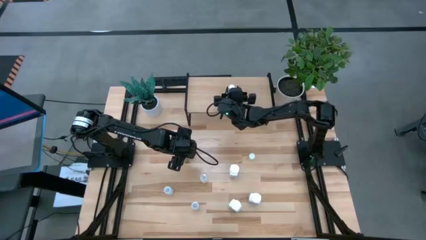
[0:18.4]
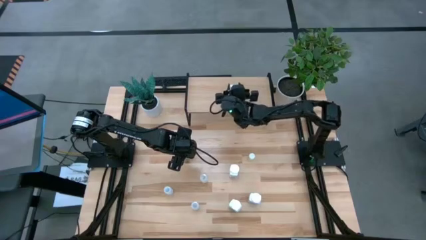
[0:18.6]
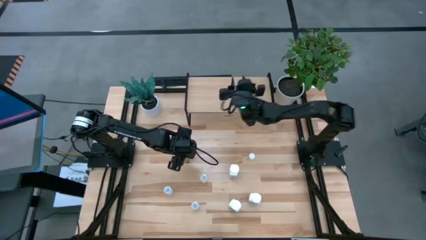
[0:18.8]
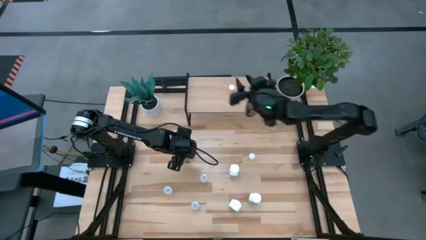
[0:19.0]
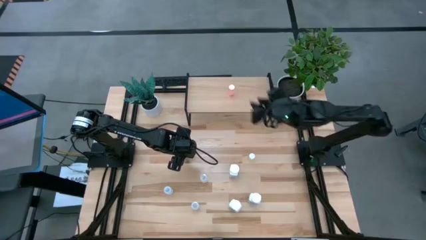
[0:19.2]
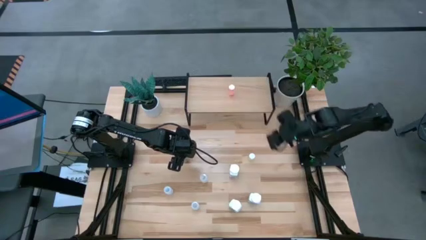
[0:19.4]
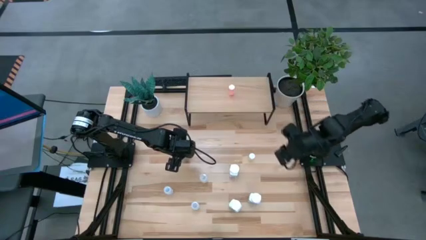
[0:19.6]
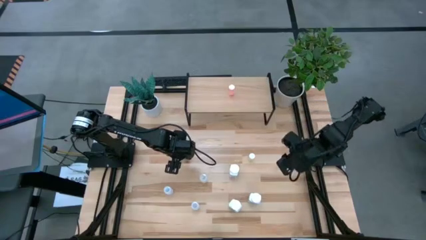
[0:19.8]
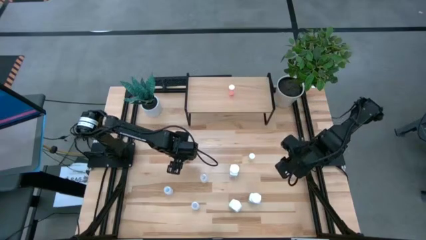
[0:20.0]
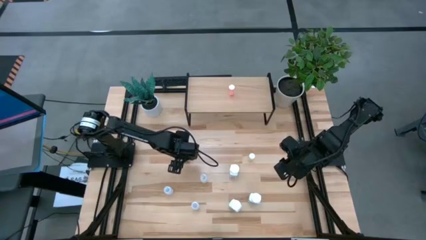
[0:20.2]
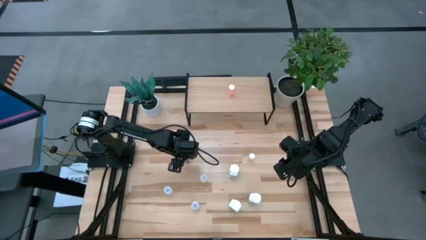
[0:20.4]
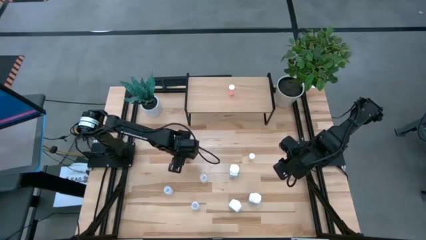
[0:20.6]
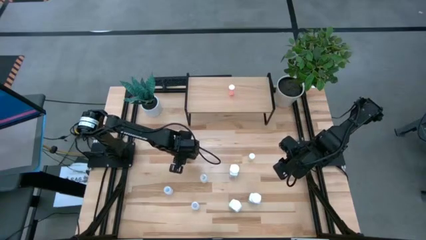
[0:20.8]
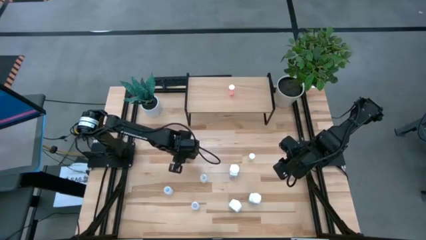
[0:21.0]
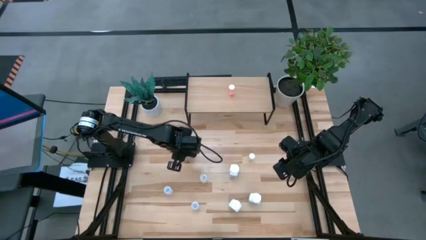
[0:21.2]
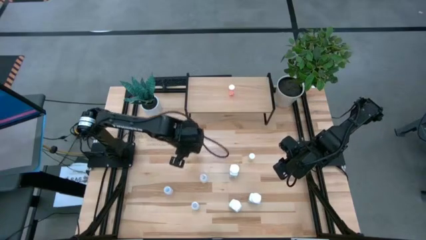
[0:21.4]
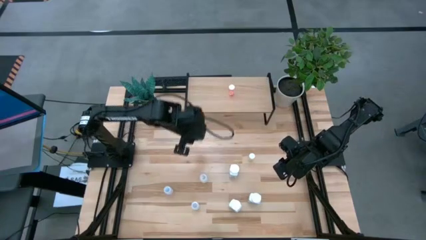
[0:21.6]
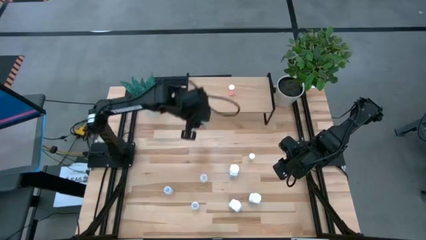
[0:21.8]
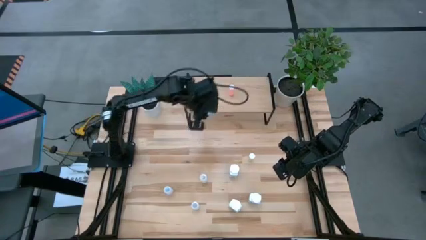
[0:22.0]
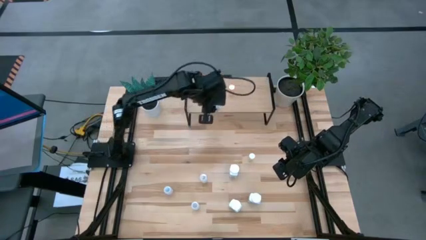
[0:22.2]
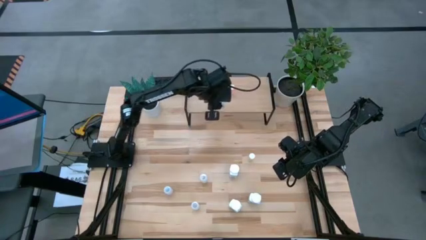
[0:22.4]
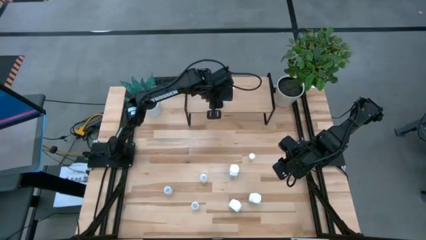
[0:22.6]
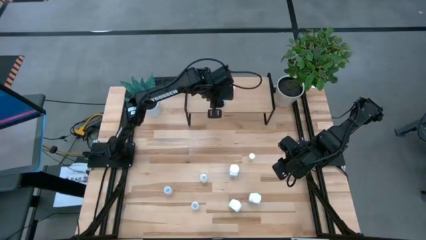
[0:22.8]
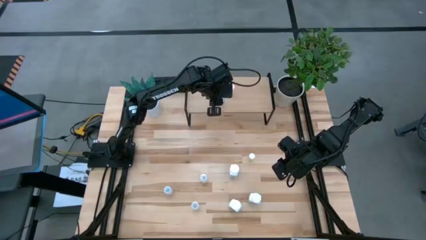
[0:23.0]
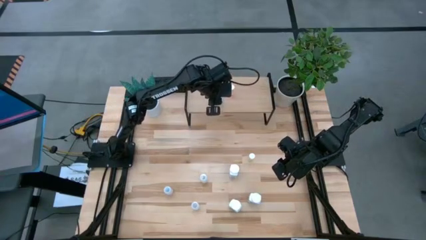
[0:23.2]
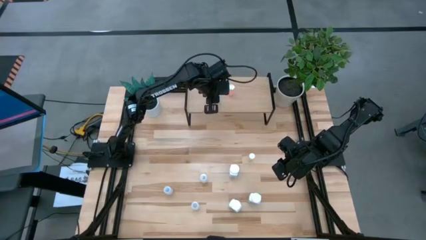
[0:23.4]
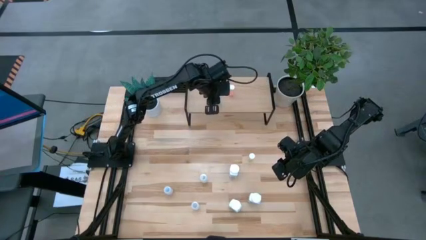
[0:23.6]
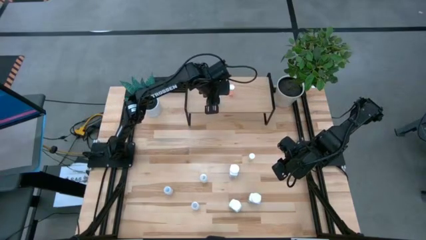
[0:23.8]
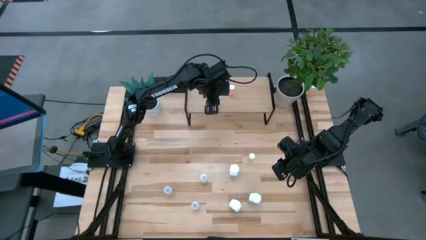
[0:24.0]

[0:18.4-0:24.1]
Task: Pick and place medicine bottles onto shelf by color
Put the blue pill bottle on the shelf

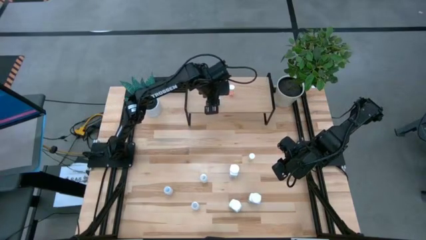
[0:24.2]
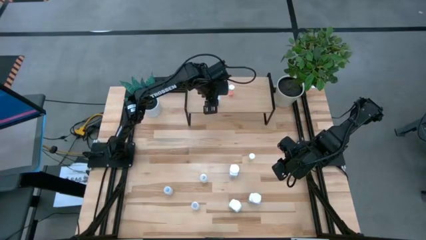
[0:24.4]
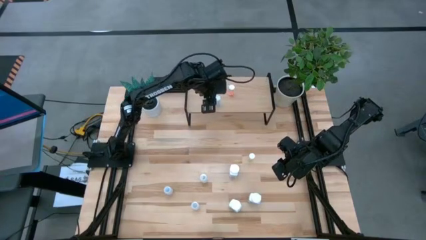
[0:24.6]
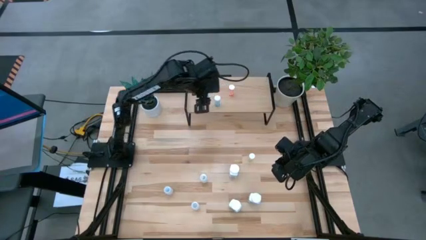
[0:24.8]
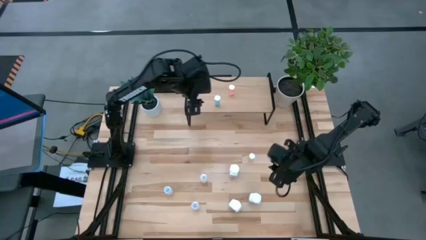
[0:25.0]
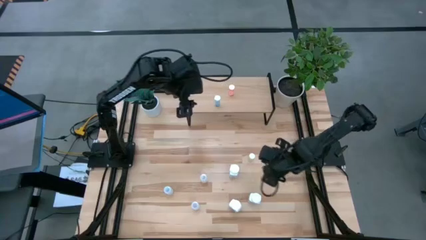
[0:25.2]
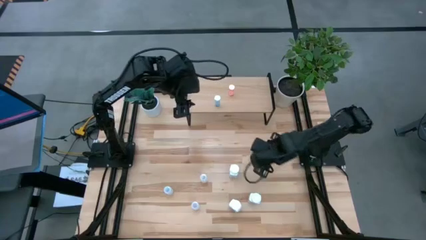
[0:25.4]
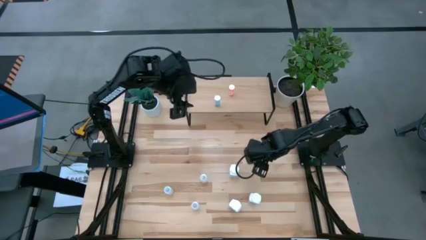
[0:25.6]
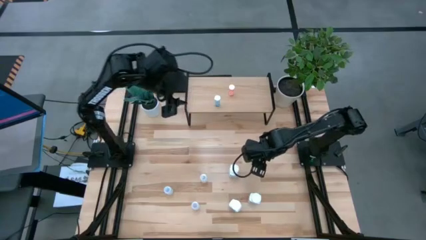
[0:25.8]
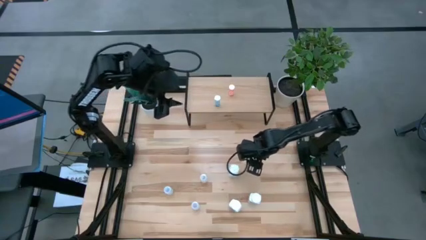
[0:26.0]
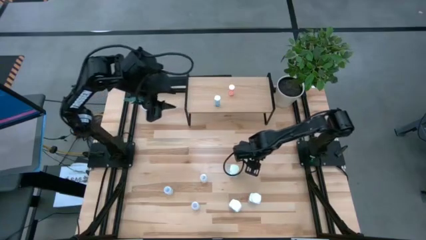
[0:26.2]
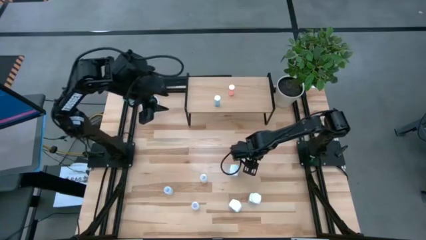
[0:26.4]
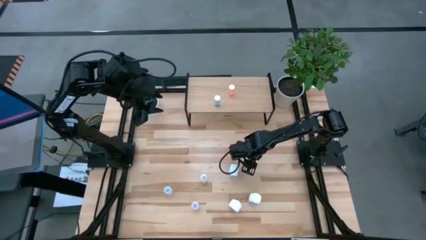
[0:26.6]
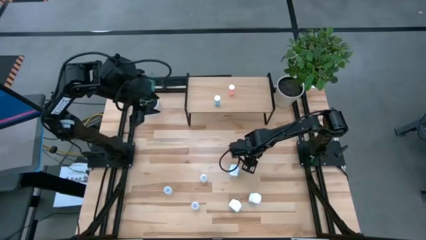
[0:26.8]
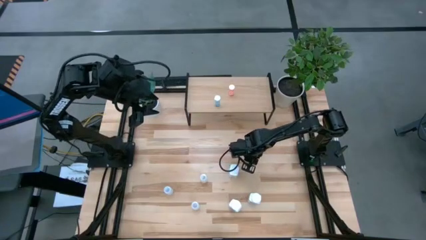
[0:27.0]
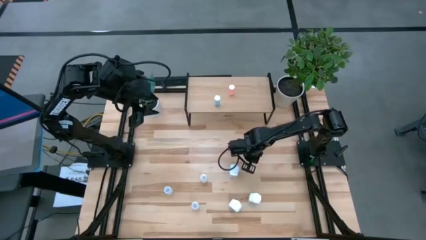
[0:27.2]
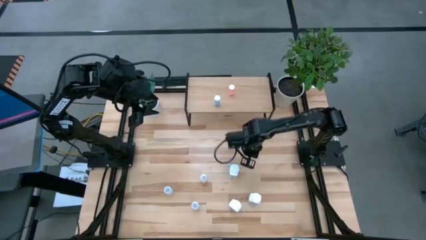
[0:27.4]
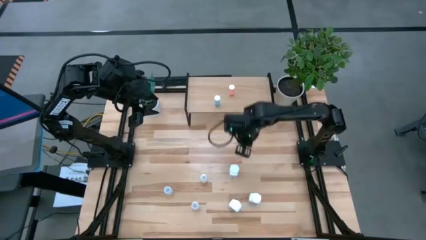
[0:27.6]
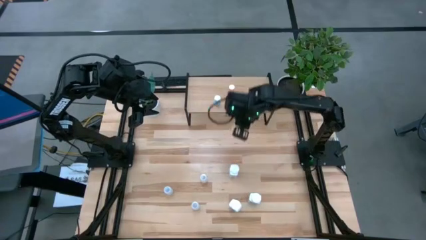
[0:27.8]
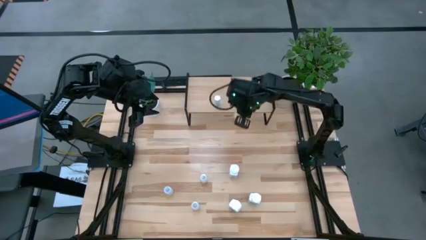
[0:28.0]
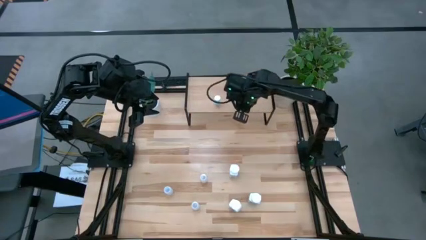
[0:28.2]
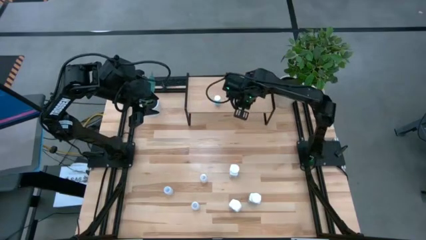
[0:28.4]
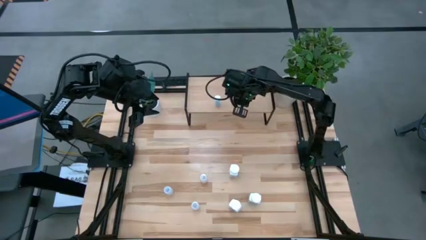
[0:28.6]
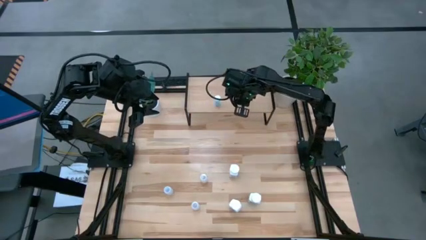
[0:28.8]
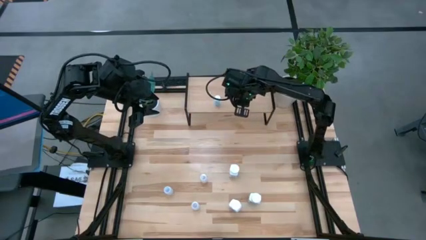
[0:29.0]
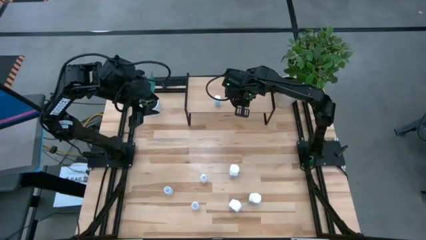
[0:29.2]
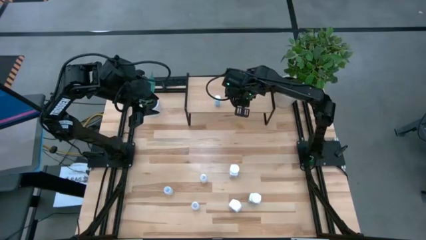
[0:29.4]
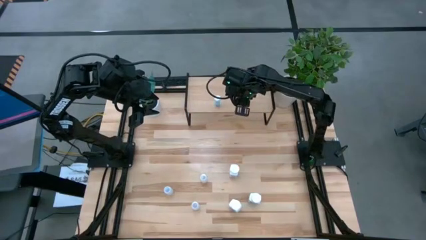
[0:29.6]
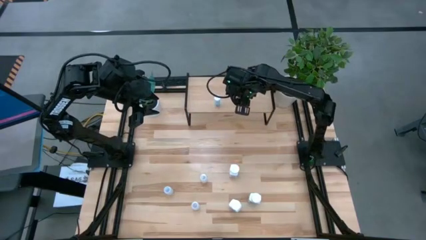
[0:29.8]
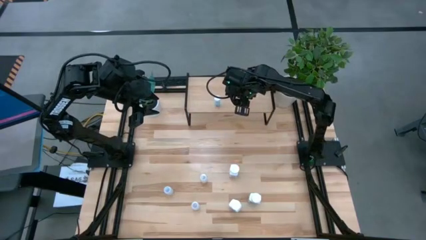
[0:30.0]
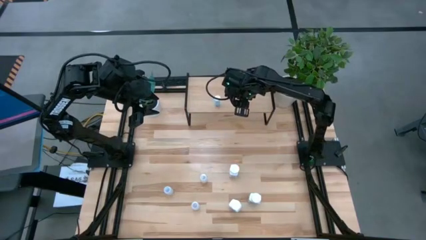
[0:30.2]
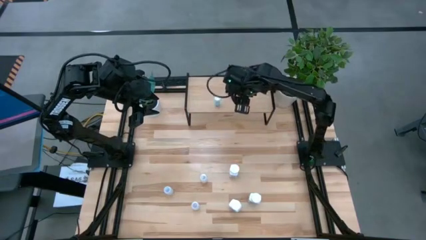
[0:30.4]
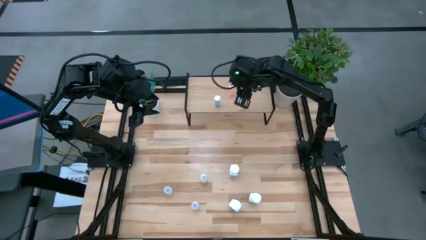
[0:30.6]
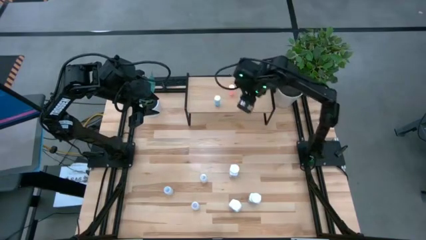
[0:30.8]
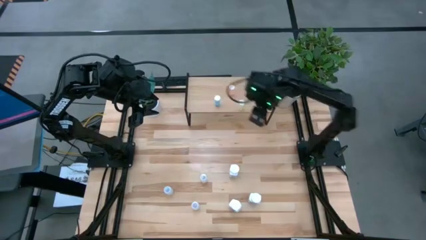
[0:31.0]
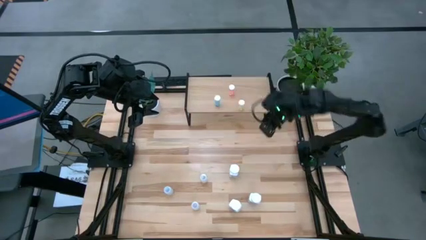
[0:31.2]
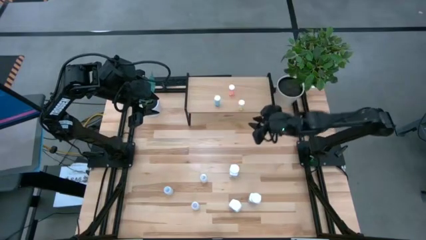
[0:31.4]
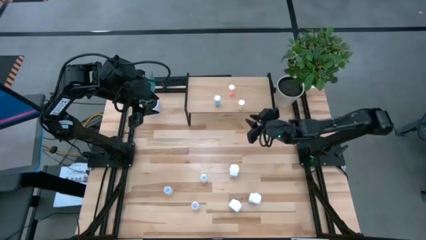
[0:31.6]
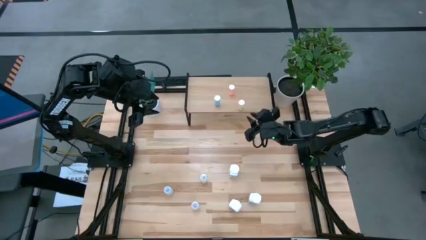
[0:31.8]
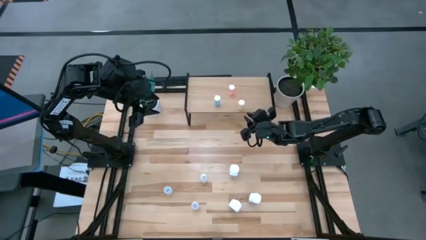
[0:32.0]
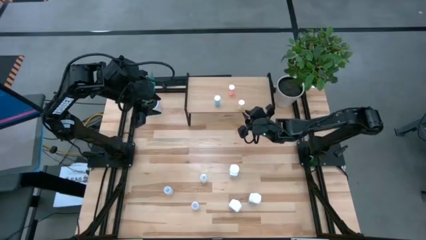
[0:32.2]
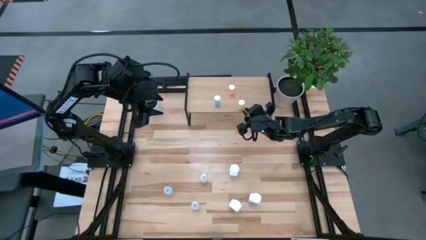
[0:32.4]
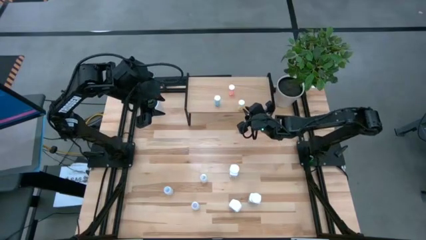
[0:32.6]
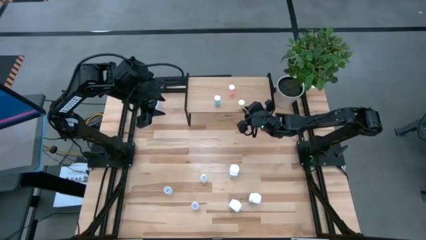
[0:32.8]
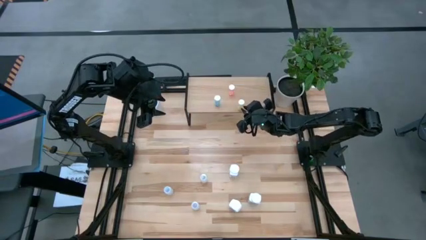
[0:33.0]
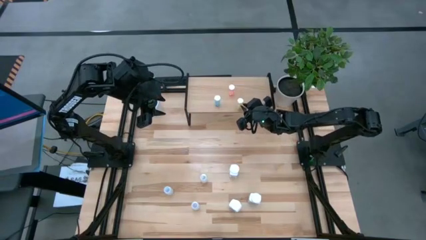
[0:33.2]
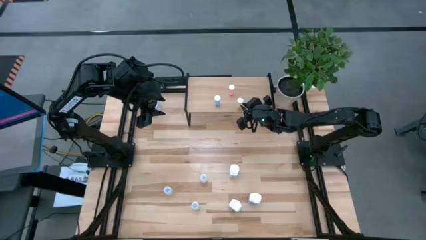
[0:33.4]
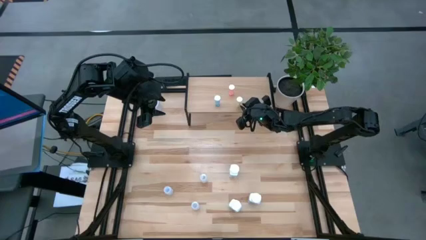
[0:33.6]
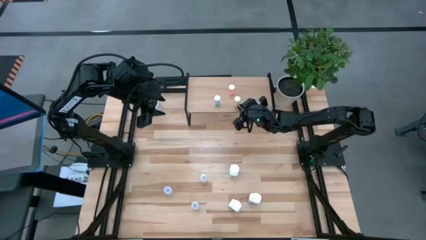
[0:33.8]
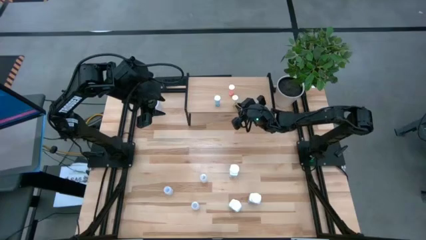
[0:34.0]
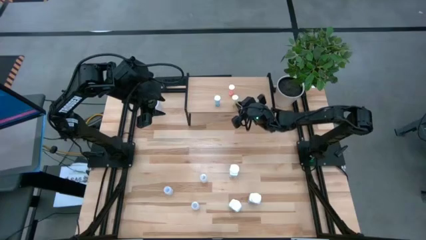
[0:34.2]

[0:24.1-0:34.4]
Put the yellow pill bottle on the shelf
